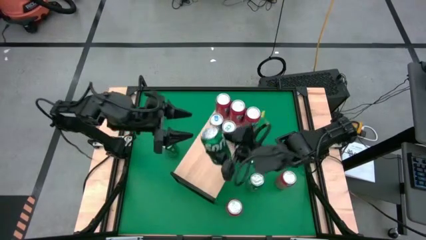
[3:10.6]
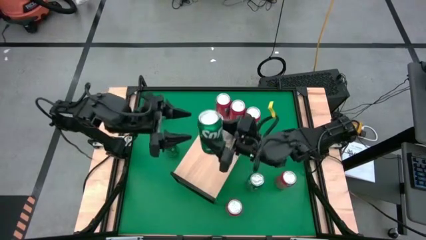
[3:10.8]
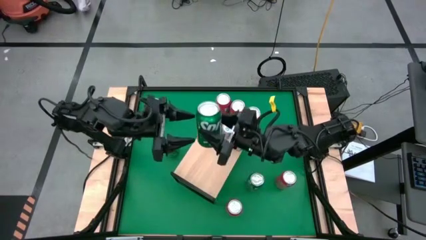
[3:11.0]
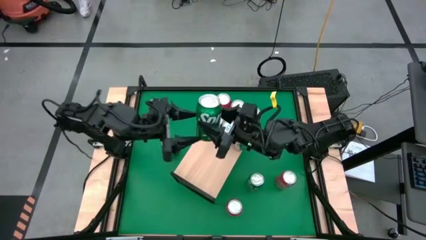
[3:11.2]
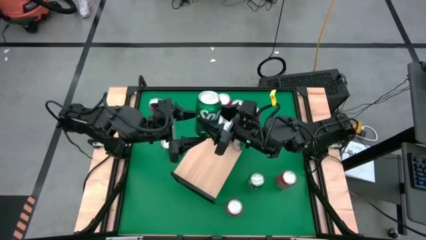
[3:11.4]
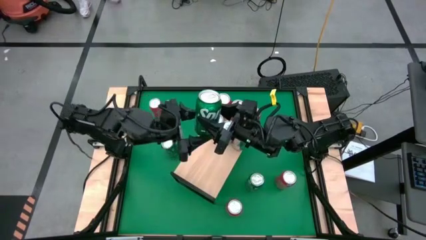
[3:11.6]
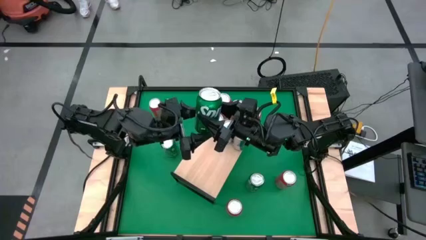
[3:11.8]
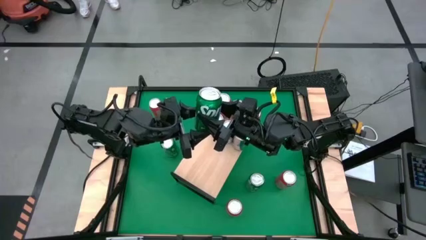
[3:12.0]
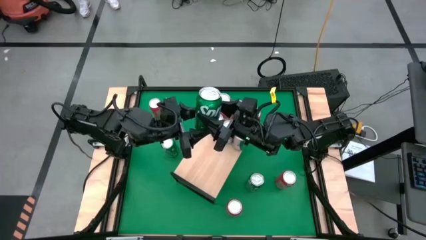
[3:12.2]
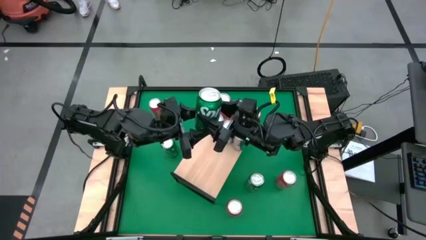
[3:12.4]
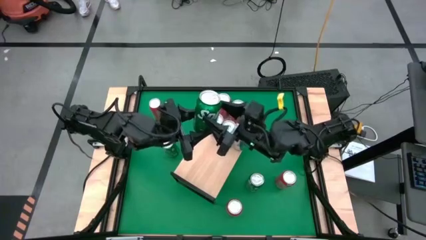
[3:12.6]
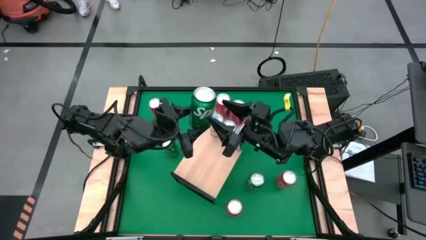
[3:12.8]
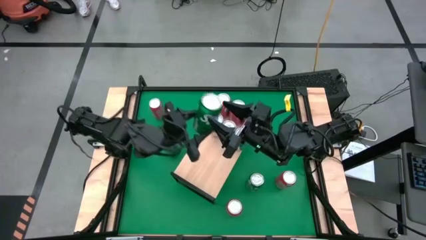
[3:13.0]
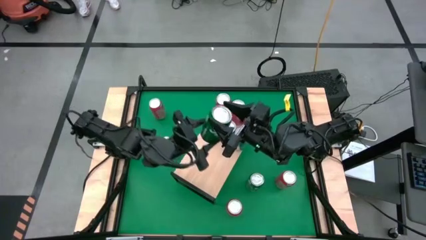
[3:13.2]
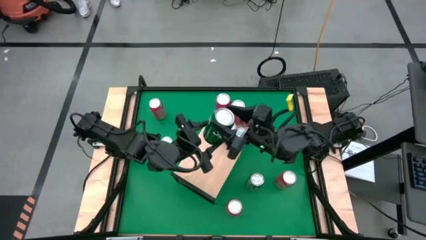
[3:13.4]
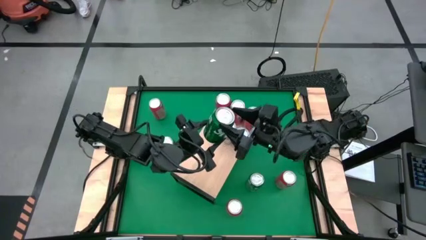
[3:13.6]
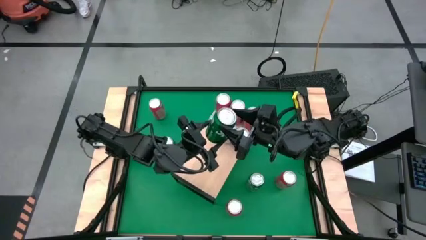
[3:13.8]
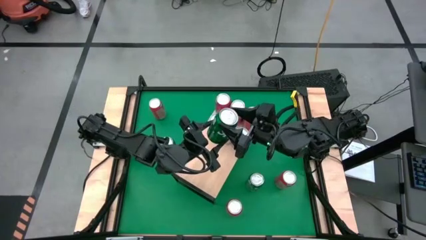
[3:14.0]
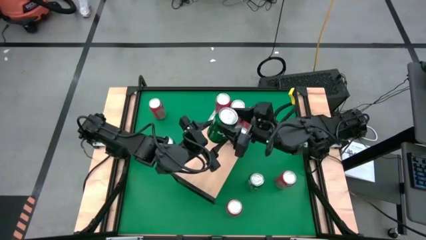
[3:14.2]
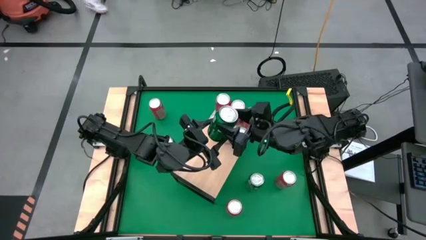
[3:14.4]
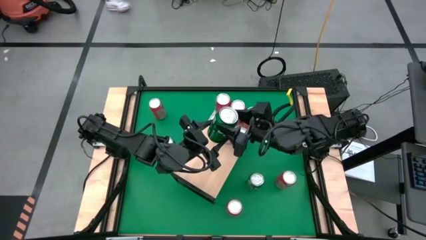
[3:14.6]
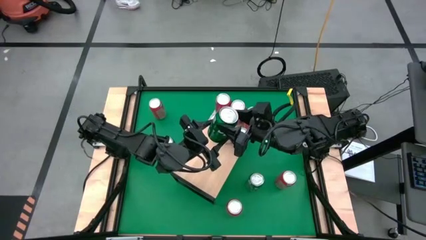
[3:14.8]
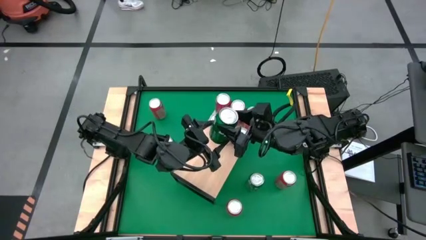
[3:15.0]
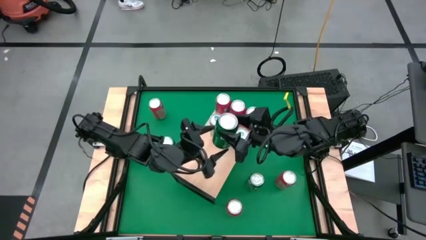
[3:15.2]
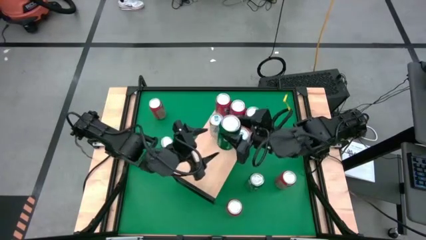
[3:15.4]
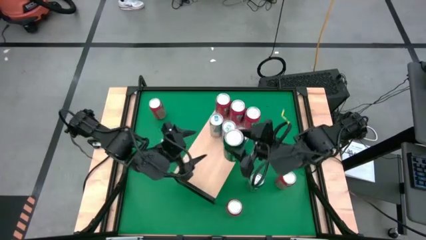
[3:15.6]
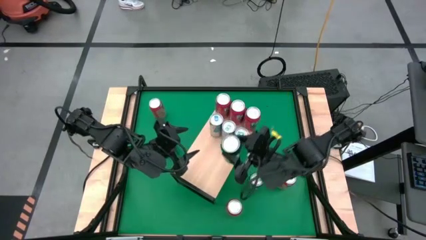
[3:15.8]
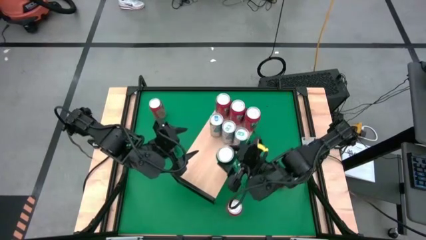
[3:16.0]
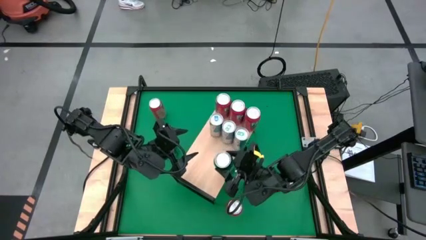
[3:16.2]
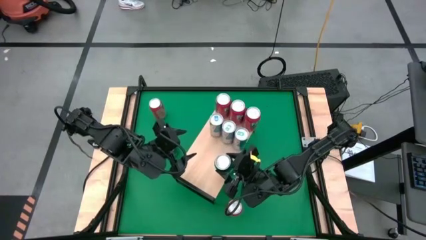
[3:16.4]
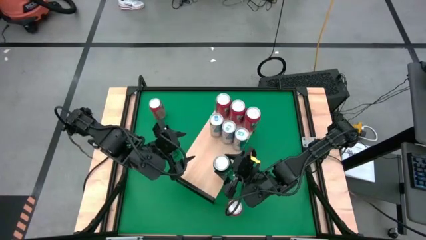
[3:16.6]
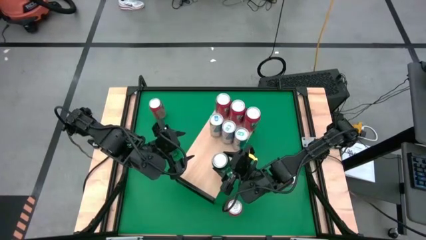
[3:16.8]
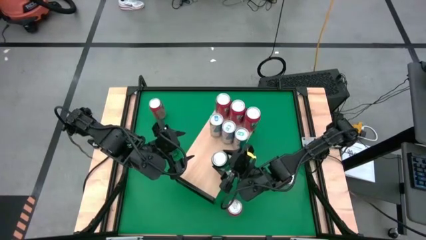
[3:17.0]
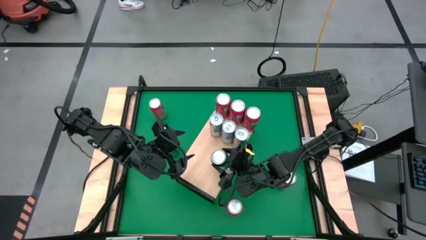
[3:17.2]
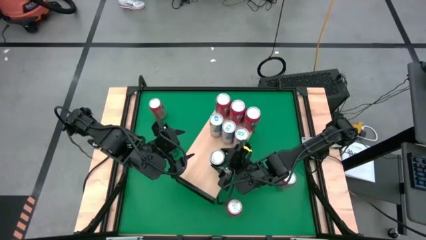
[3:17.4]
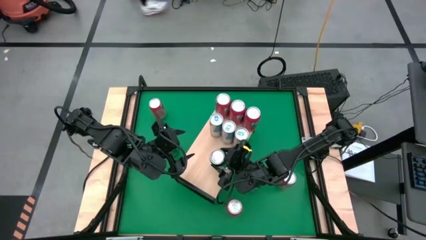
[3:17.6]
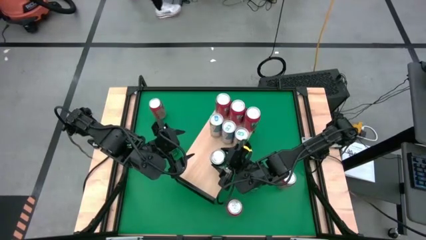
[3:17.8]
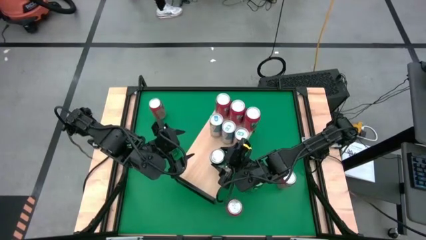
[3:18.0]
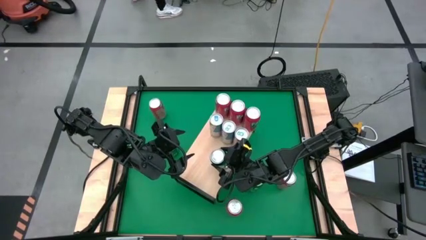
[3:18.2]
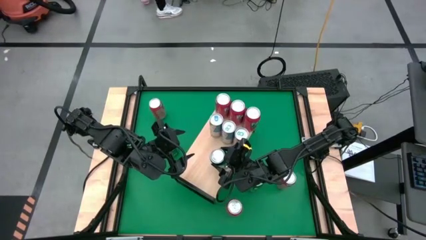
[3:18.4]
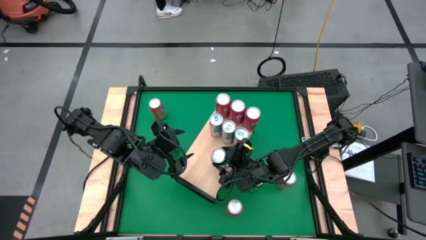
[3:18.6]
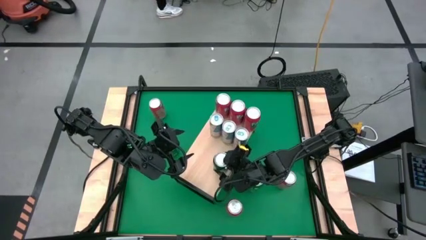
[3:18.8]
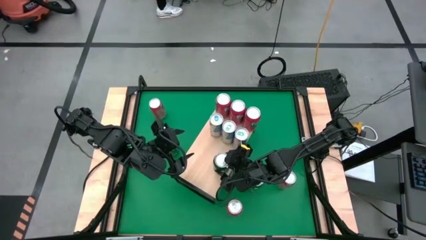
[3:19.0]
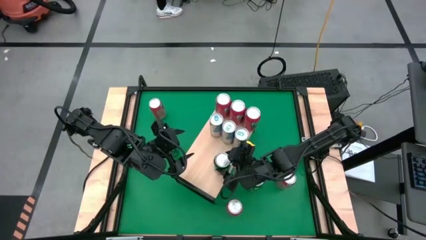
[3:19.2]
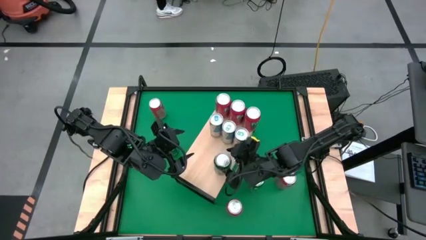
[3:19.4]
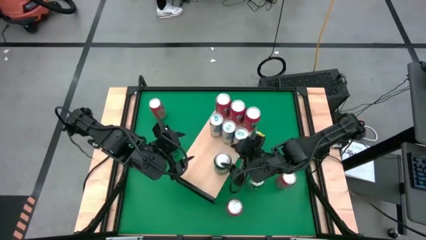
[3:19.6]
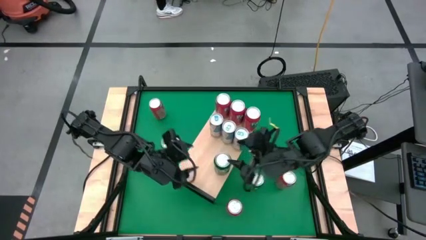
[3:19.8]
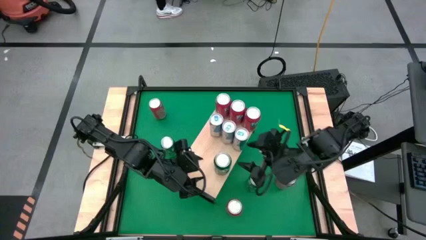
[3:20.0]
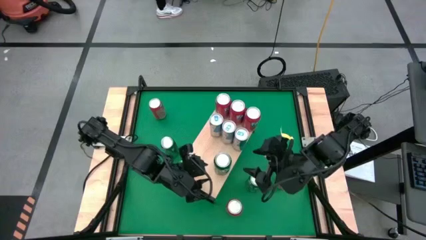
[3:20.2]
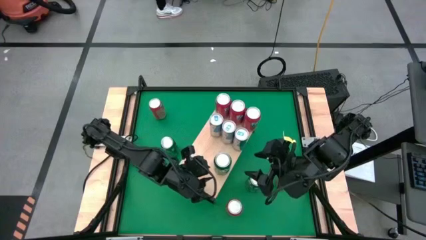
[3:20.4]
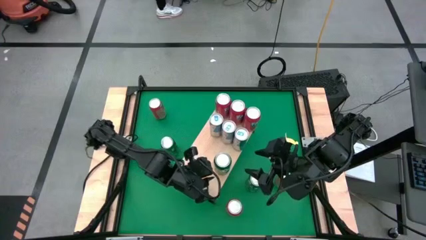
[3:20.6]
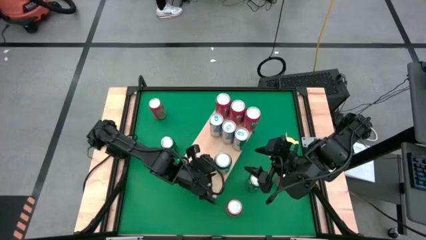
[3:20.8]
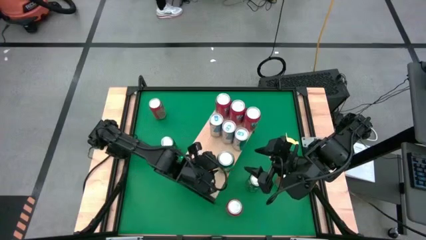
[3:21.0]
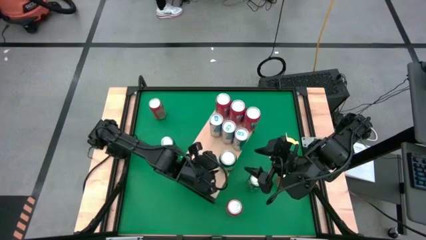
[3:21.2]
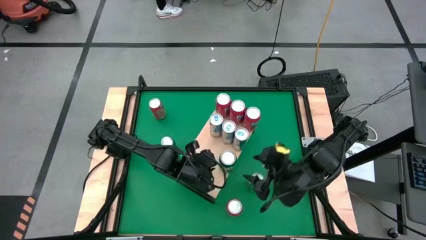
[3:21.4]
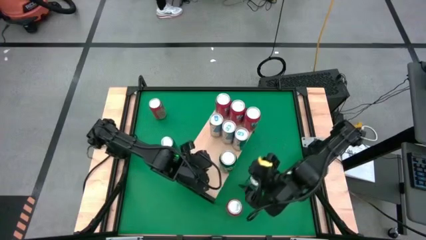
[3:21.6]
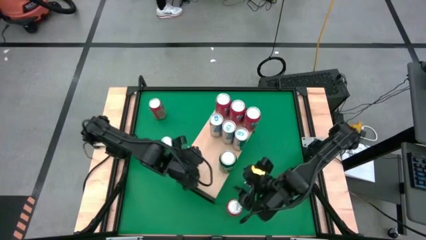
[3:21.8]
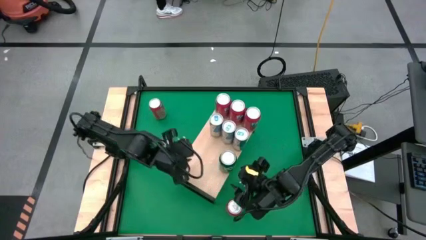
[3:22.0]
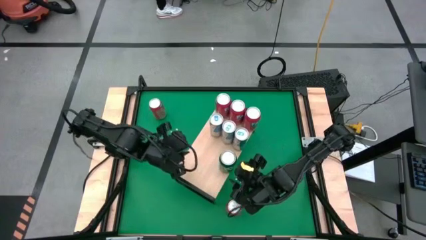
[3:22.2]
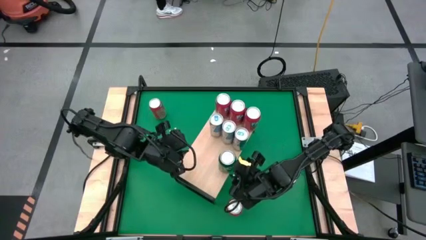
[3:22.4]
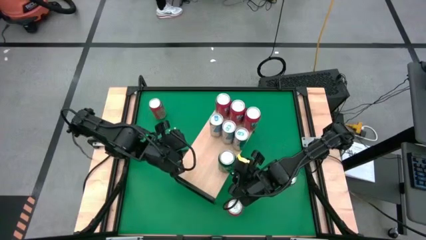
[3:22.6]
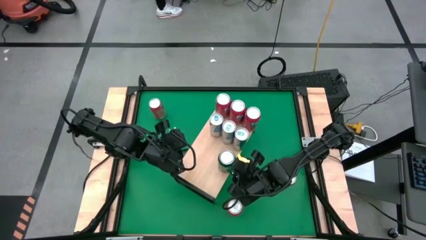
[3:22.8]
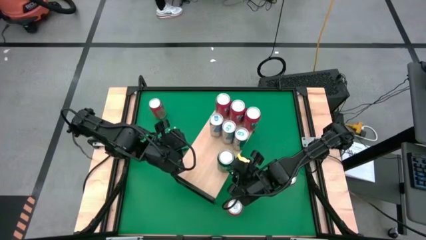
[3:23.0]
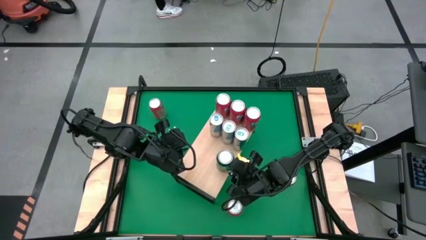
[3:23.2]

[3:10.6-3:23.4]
Task: Sort soda cans
Put the green soda can on the shelf

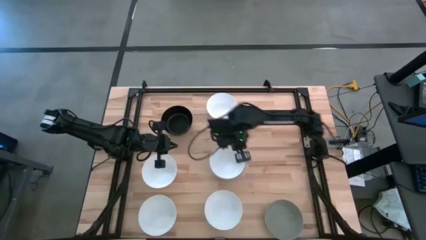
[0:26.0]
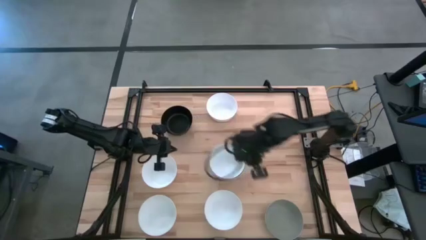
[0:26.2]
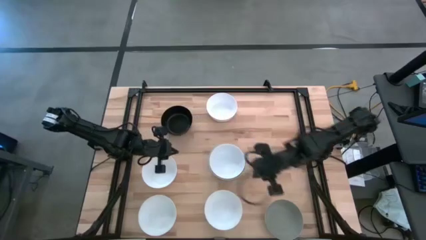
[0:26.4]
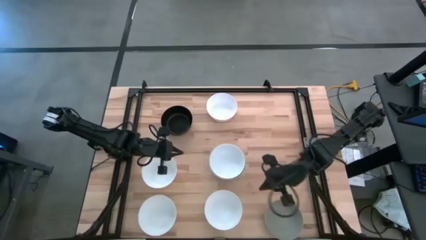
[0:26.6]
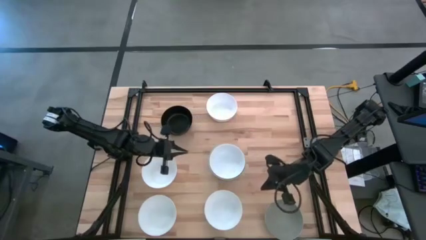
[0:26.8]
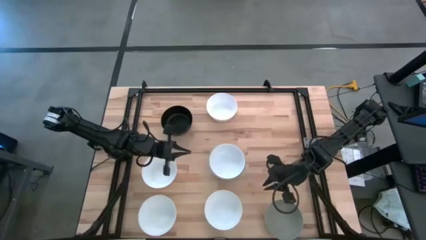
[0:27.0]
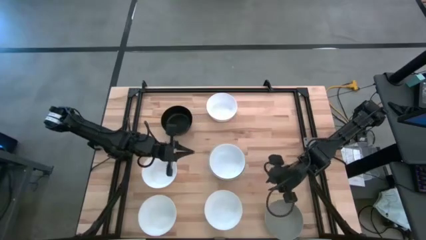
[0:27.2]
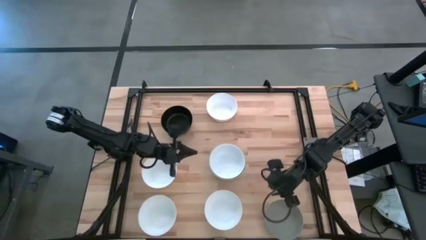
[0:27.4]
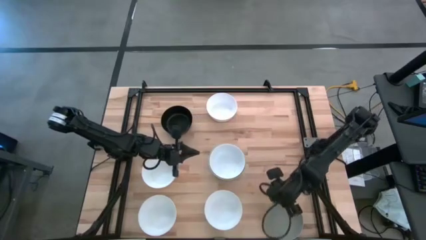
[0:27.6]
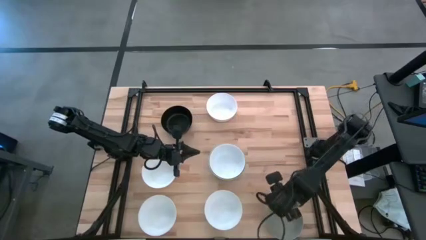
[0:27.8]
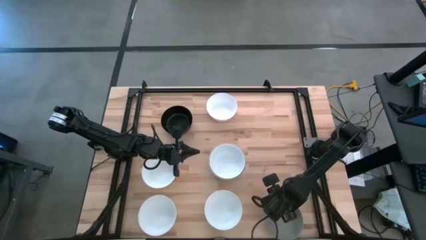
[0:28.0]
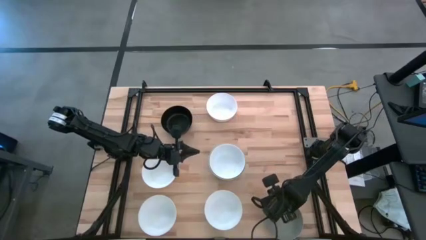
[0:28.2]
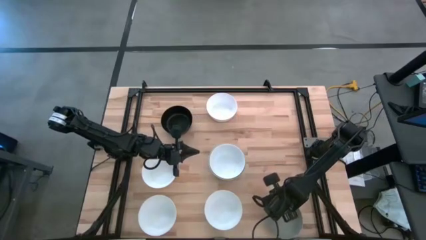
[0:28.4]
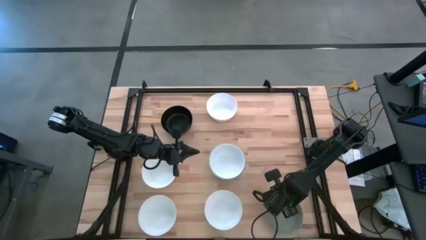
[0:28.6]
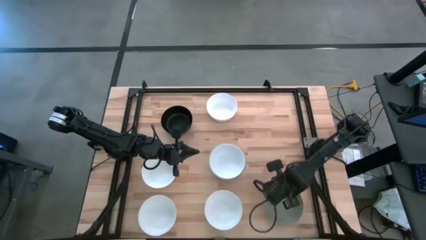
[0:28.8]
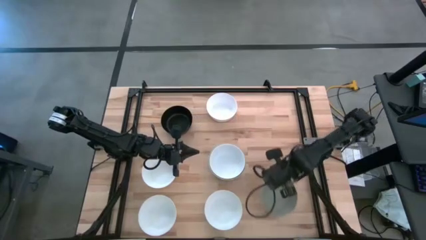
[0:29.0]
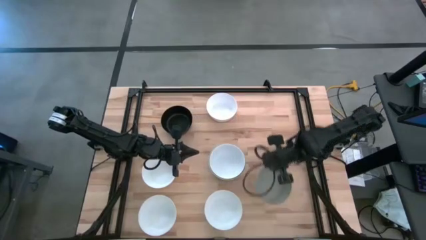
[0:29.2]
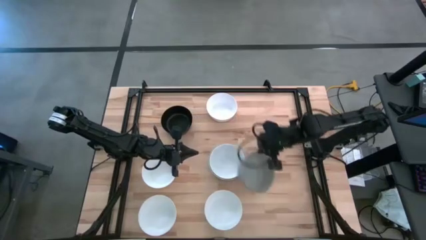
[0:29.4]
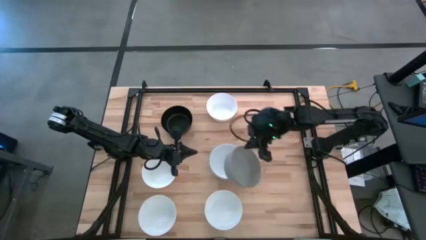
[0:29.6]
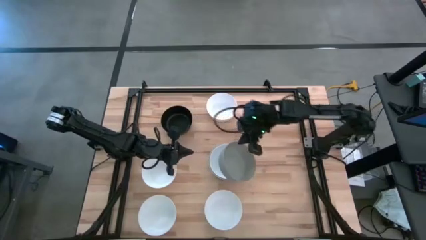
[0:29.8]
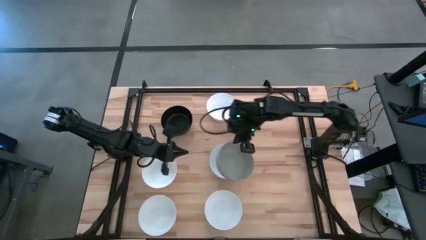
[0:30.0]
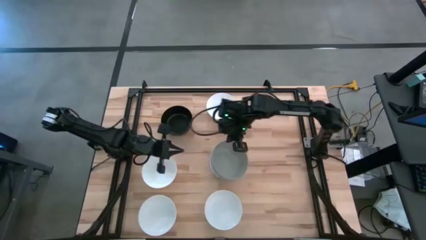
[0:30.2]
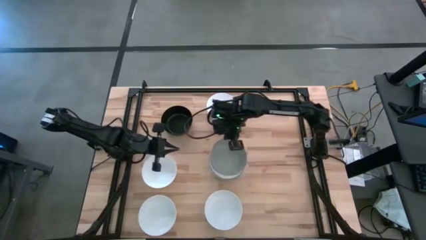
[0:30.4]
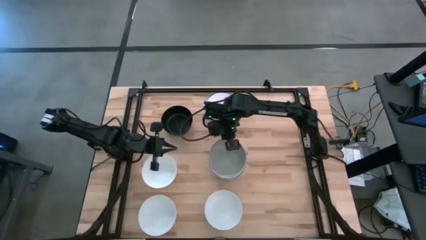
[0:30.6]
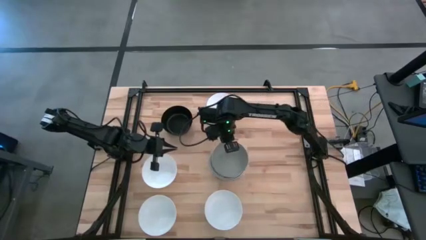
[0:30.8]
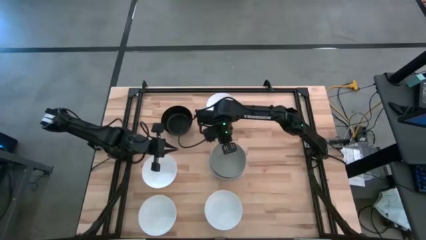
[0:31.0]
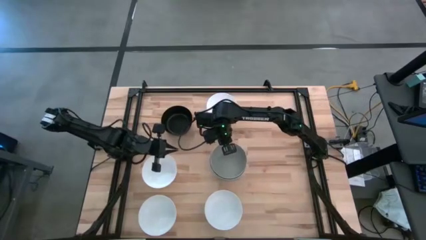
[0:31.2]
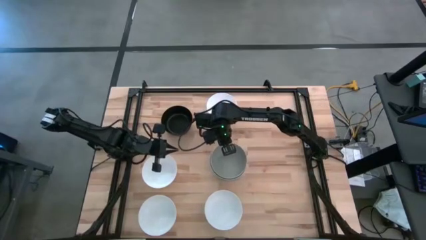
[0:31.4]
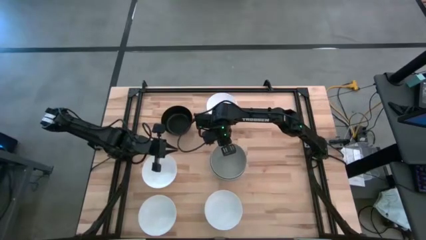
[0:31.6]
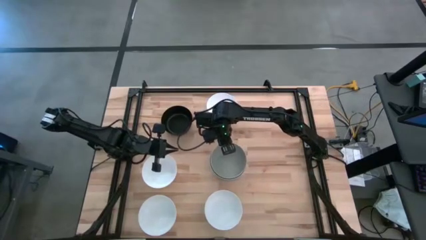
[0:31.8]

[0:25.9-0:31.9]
Task: Nest bowls inside each other
Stack the brown bowl on top of the white bowl
